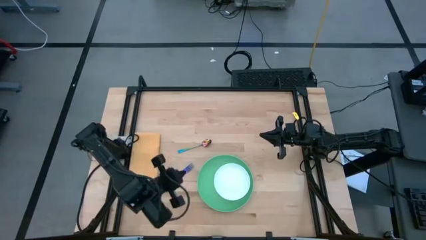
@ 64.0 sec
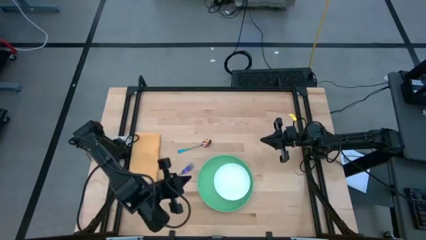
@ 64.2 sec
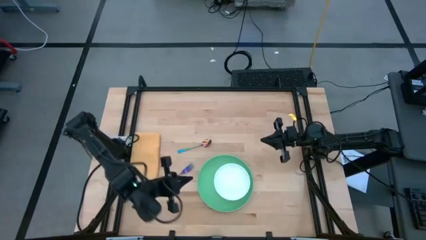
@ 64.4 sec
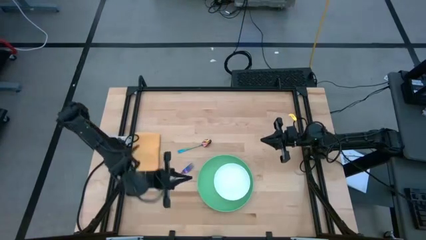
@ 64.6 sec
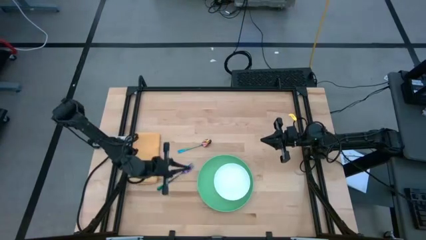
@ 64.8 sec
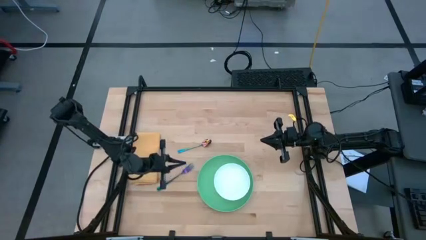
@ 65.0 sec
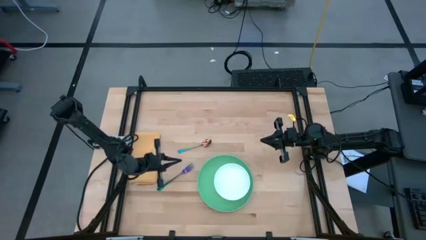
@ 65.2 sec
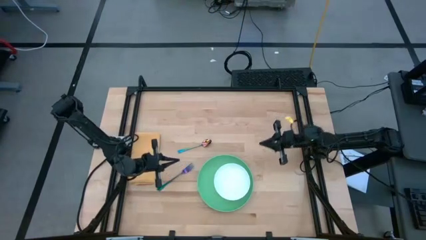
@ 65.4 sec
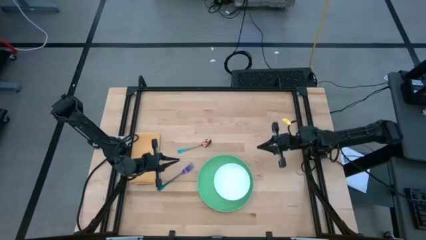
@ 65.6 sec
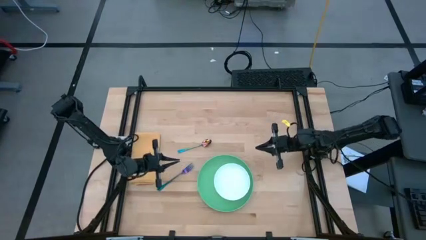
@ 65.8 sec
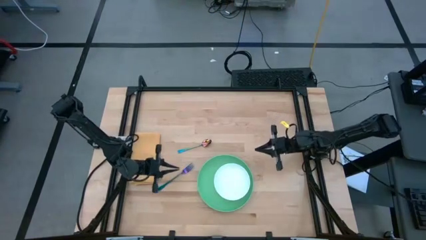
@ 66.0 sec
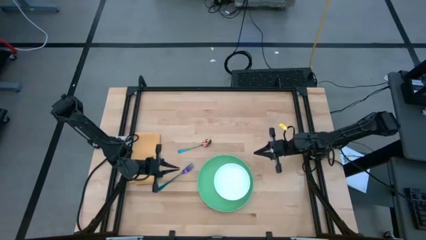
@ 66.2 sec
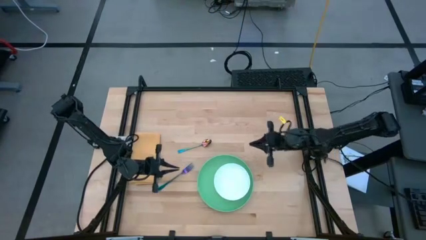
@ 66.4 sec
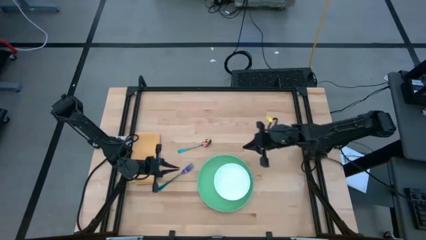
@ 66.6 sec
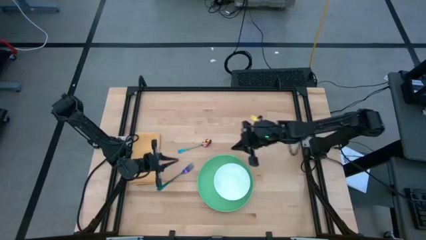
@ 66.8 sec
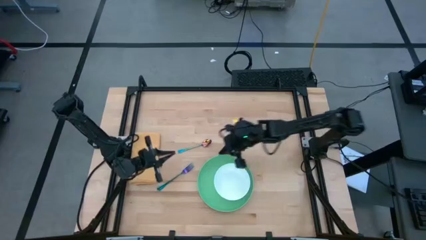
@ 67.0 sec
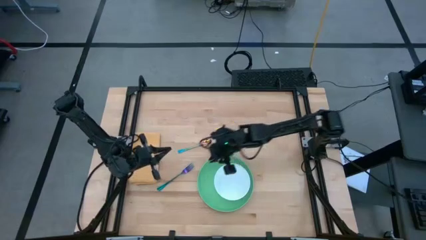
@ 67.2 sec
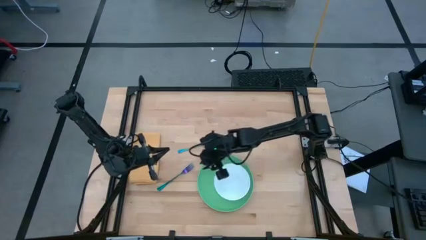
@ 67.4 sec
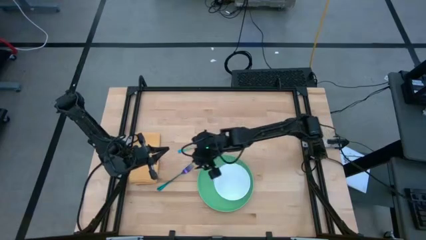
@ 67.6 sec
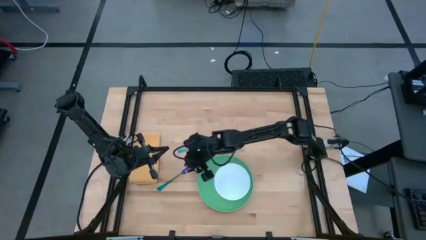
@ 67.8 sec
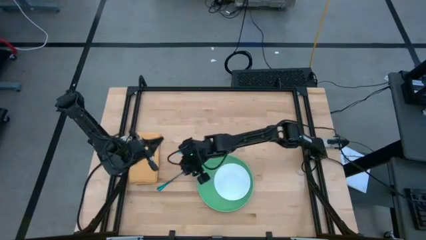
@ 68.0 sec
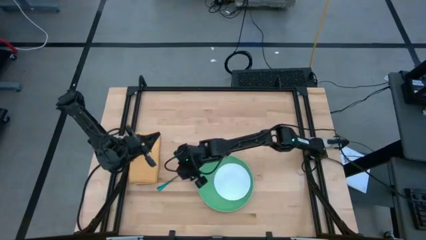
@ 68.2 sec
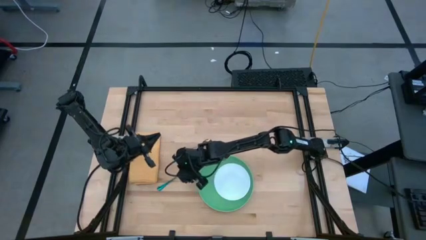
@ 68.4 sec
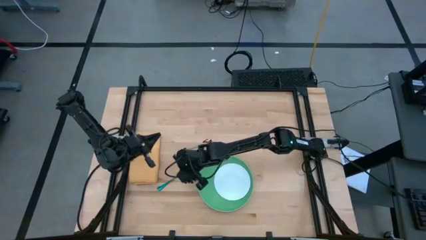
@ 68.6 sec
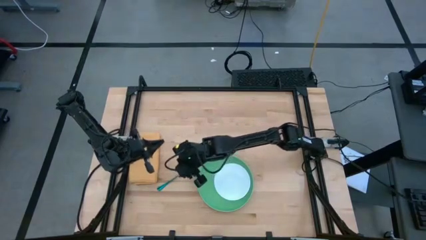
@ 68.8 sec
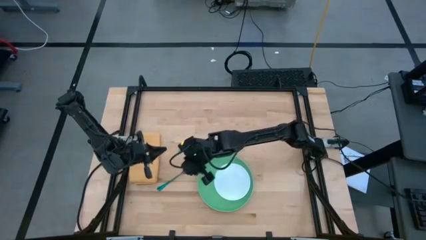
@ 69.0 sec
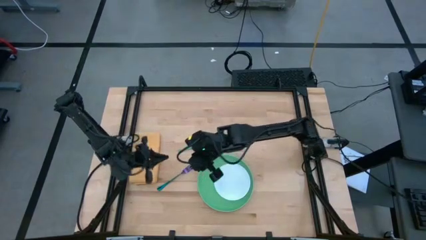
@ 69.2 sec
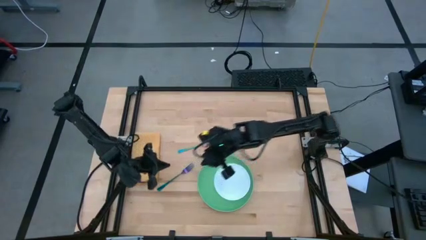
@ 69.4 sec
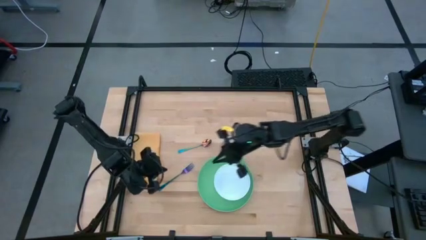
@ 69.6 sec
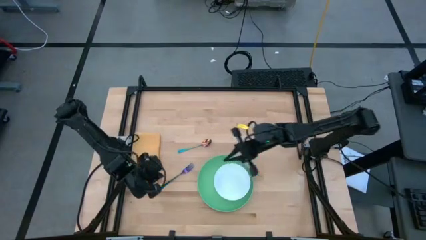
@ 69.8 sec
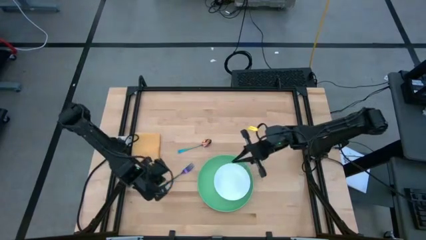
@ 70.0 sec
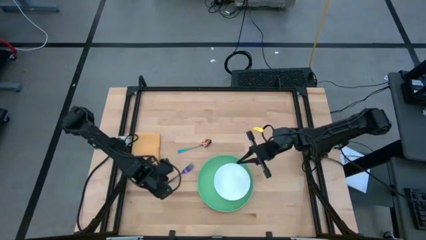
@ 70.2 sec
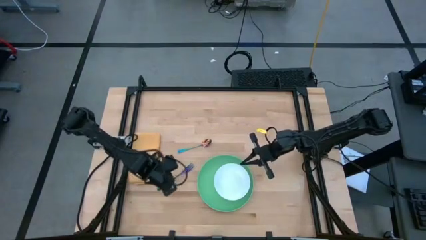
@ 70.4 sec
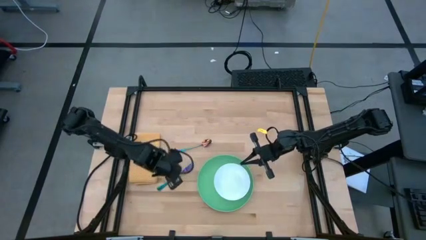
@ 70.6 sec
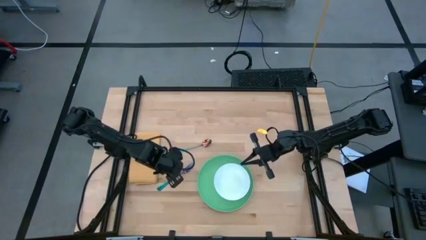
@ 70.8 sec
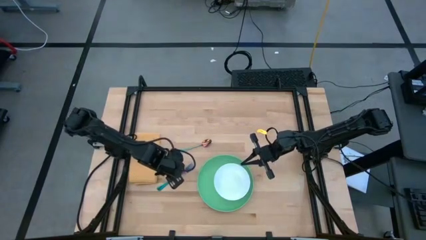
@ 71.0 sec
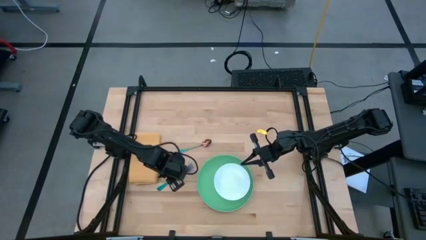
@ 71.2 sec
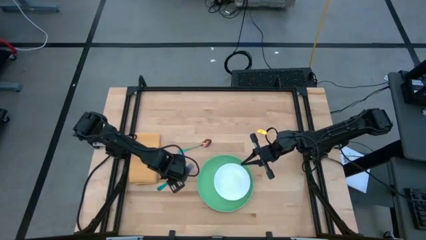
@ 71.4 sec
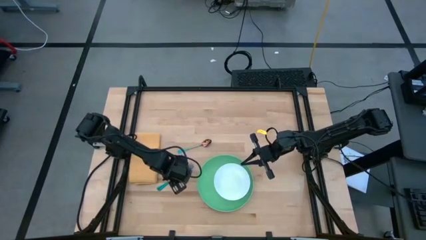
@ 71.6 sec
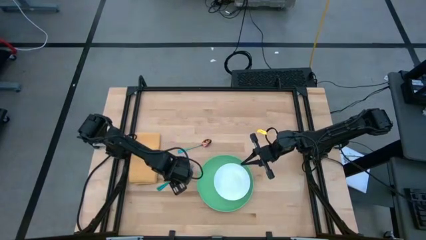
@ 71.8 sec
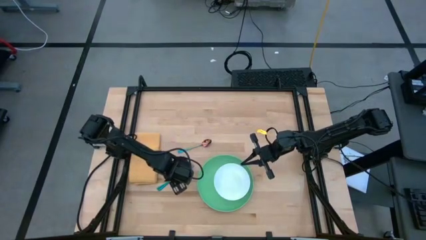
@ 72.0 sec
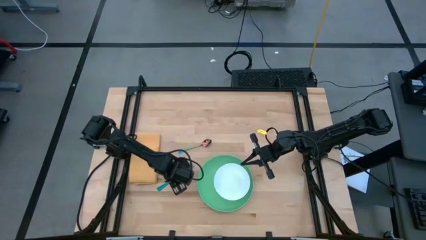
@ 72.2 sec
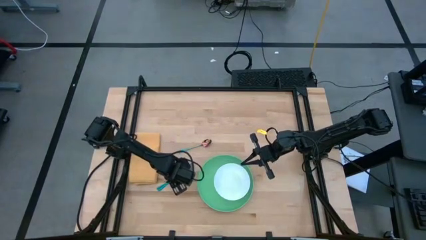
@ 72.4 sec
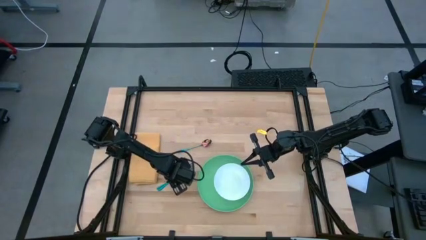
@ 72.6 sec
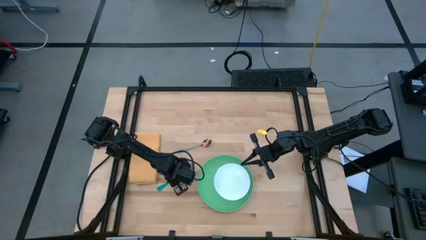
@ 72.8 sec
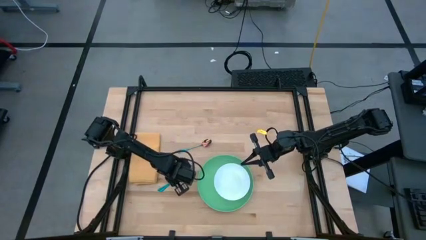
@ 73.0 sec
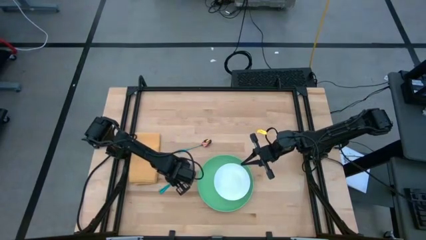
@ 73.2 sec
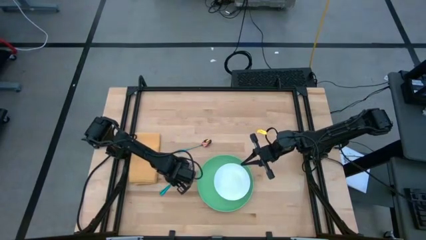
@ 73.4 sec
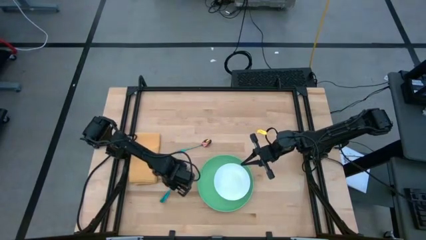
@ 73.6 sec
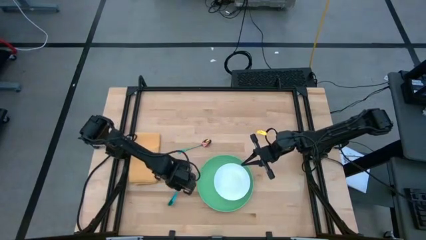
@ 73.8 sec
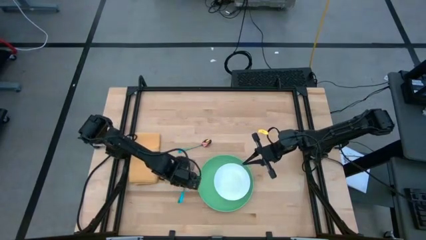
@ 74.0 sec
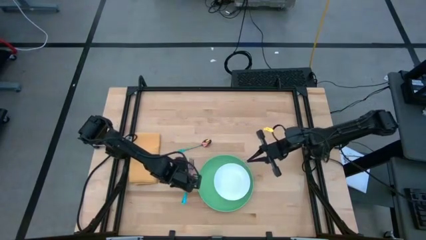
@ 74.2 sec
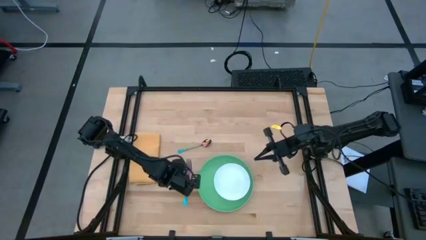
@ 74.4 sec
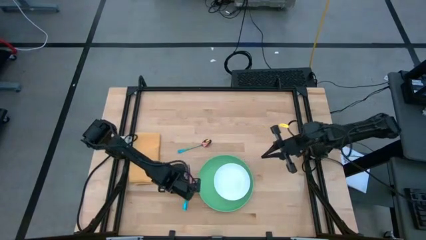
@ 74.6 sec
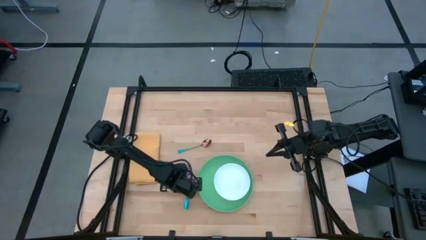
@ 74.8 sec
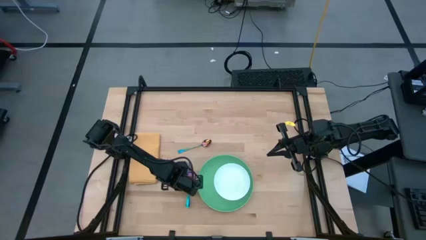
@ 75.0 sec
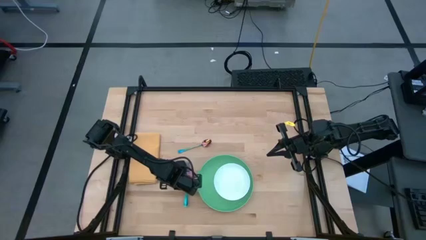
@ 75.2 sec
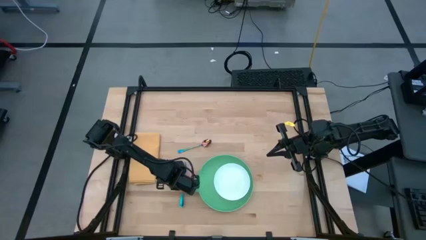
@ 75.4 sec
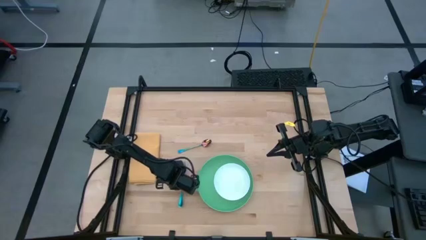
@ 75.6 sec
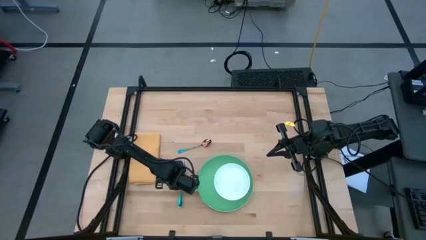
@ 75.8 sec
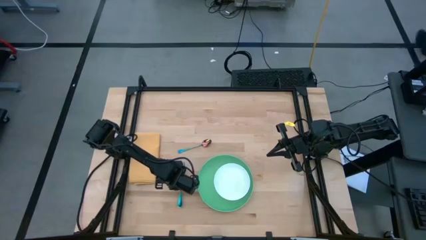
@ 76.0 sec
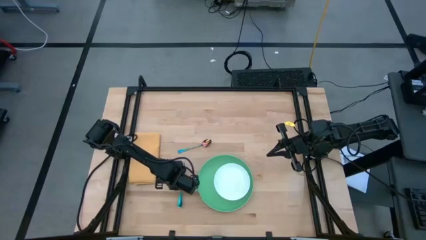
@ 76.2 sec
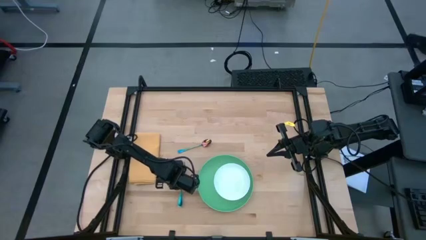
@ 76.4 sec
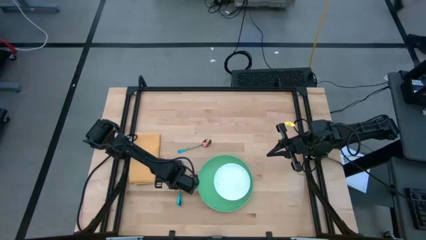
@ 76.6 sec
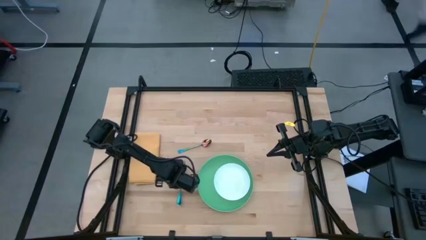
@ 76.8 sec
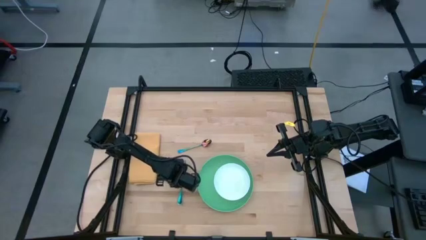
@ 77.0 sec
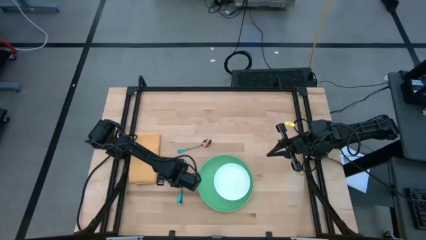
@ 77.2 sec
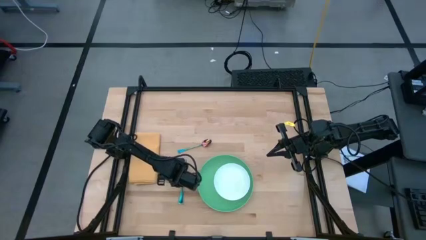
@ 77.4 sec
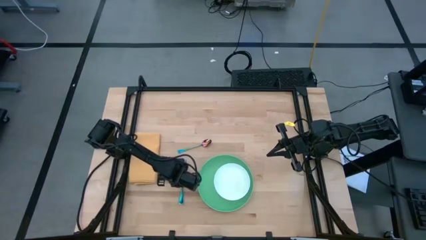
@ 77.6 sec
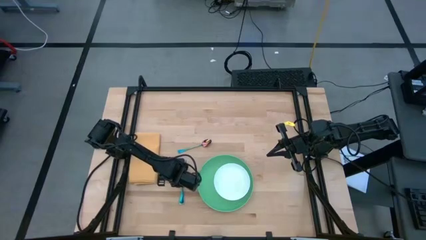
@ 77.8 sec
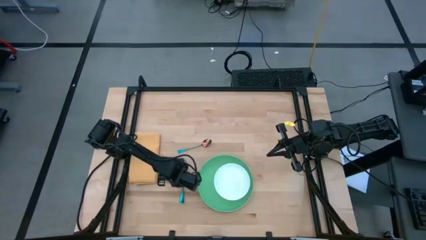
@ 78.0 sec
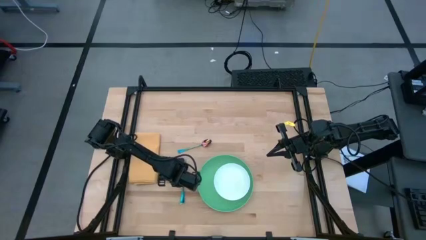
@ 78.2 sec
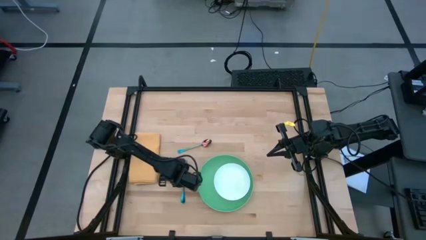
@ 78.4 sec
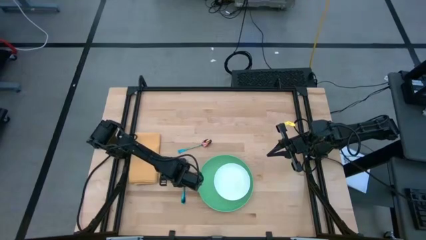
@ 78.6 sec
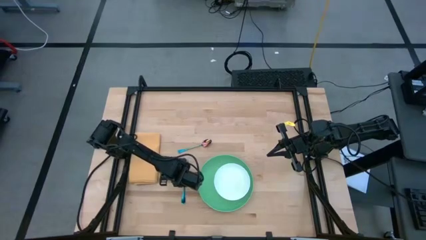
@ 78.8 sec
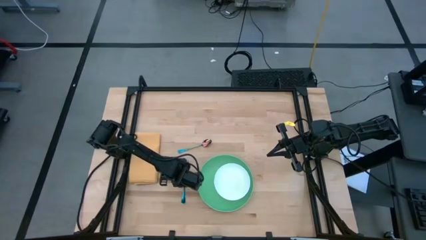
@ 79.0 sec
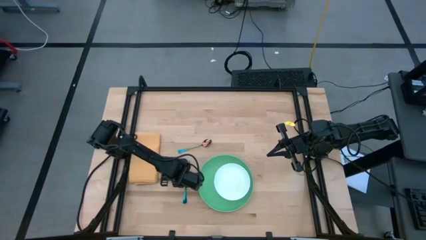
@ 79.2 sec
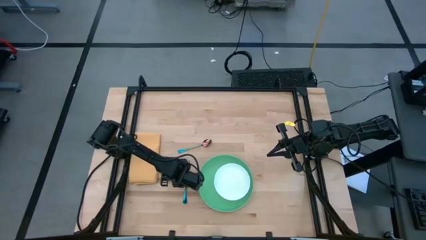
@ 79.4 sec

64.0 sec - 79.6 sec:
Task: Set table place
Adjust the violet fork and white bowl
